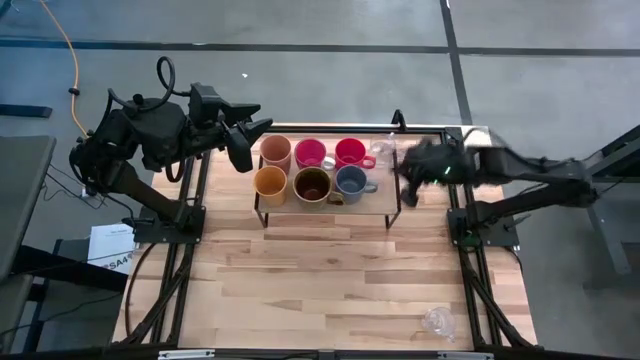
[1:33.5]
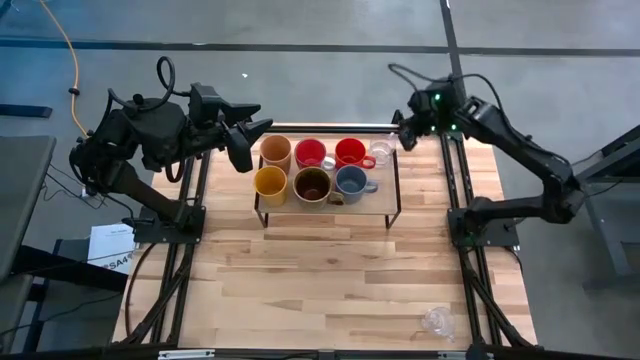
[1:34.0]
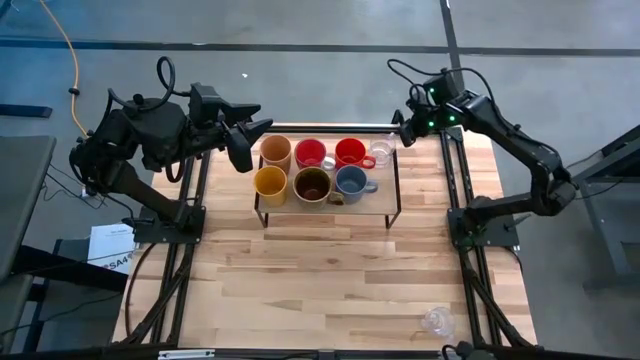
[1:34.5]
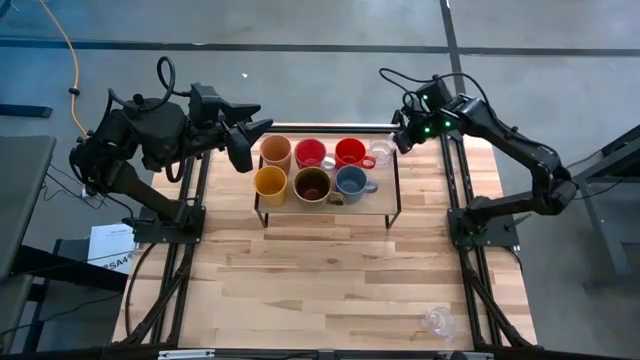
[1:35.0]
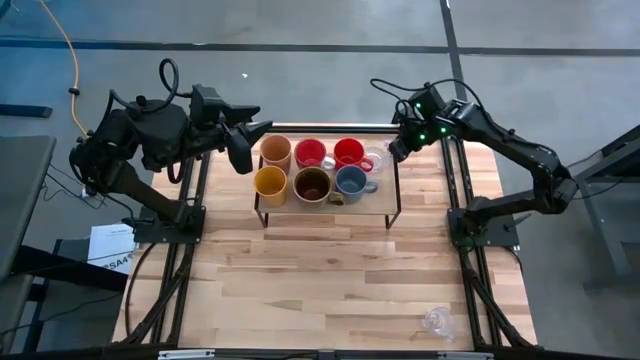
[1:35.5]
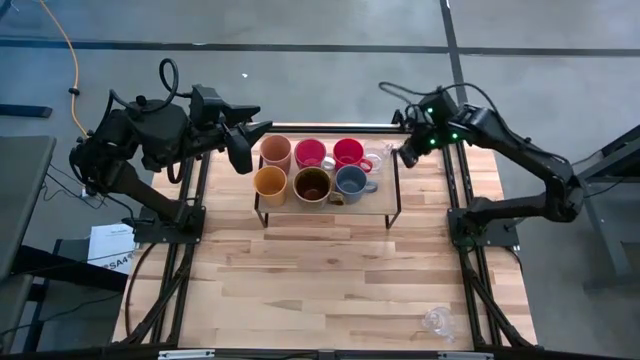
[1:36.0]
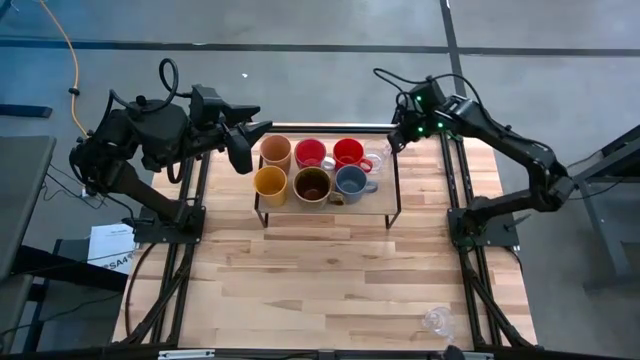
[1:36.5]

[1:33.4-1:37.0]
Task: Stack small to large cups/mugs on shelf
Adjust the transparent mug

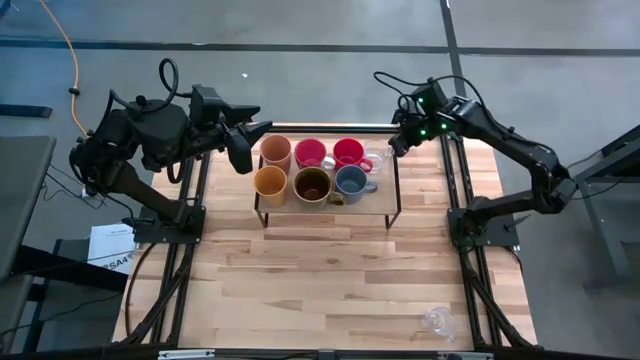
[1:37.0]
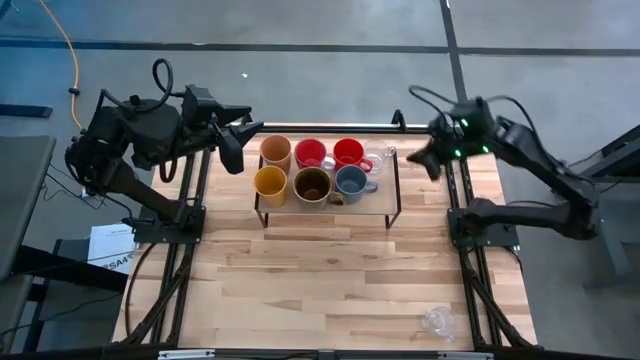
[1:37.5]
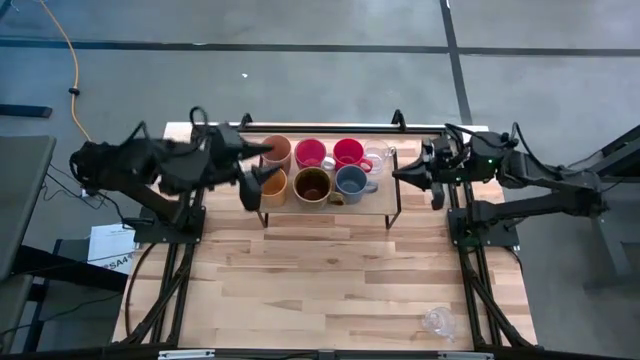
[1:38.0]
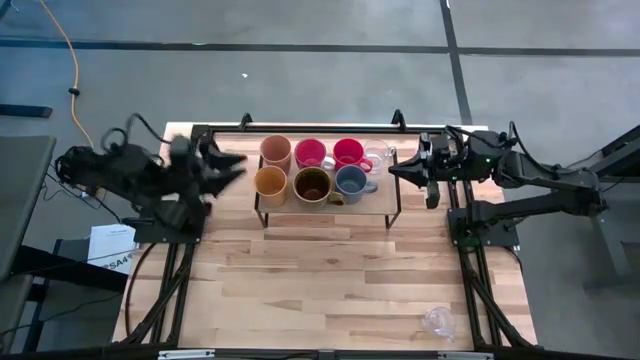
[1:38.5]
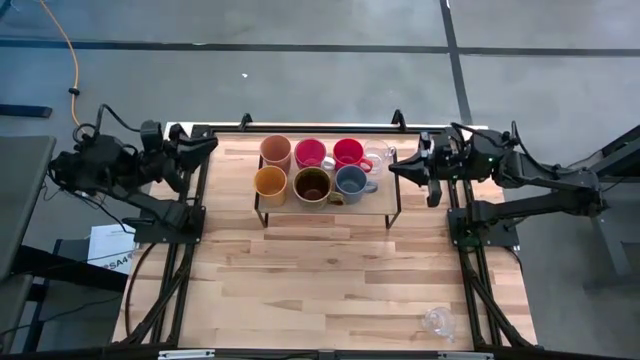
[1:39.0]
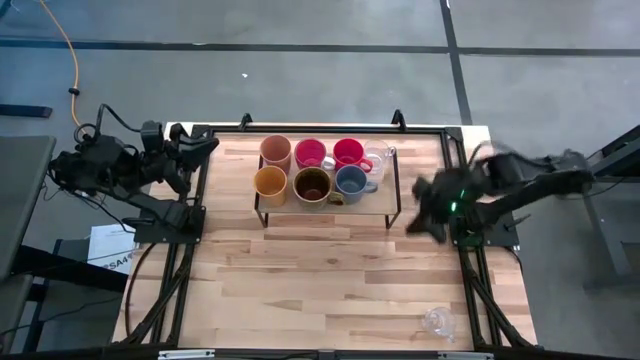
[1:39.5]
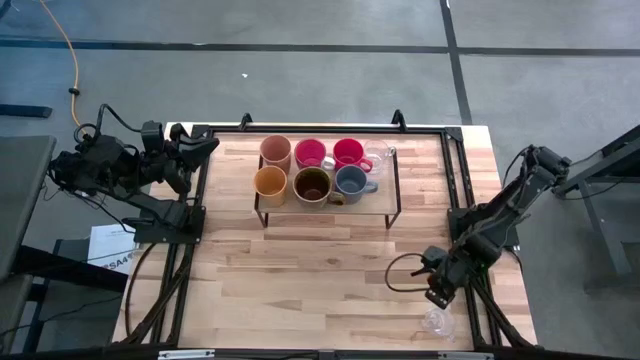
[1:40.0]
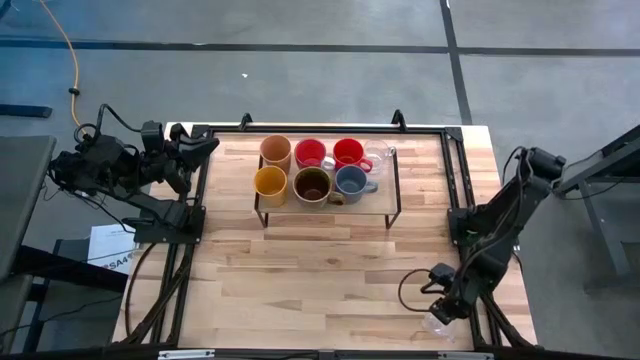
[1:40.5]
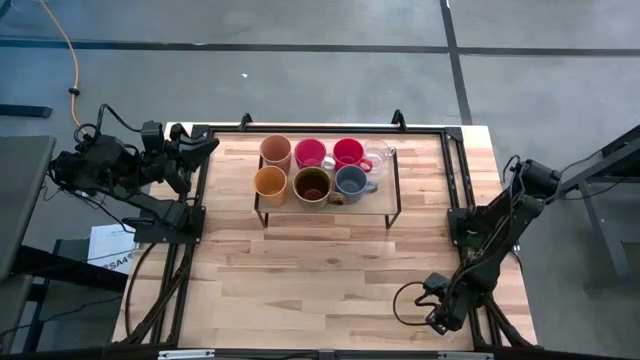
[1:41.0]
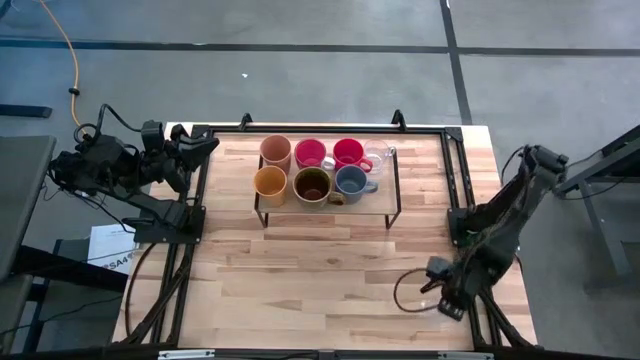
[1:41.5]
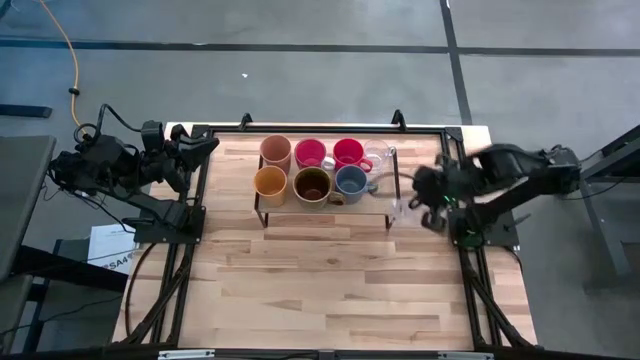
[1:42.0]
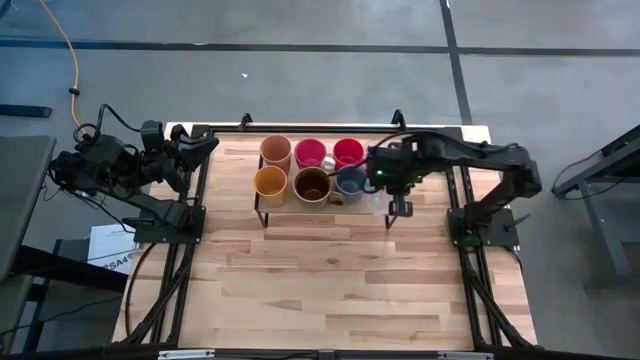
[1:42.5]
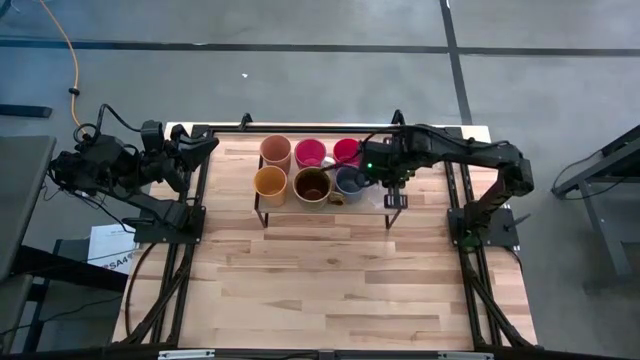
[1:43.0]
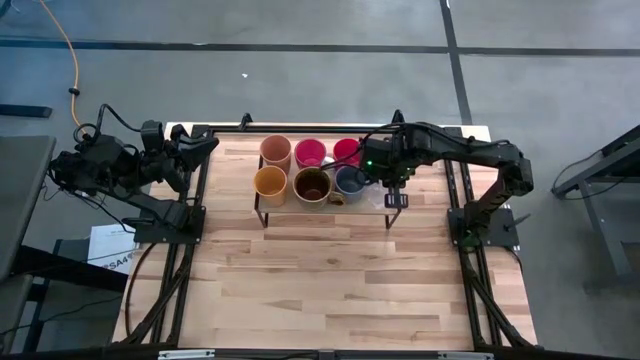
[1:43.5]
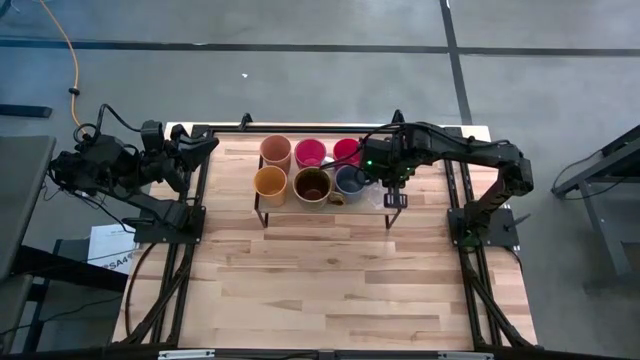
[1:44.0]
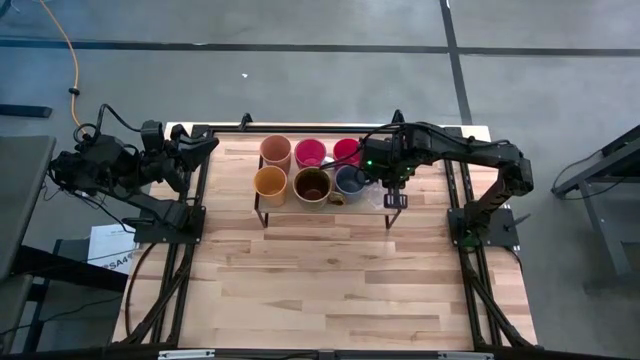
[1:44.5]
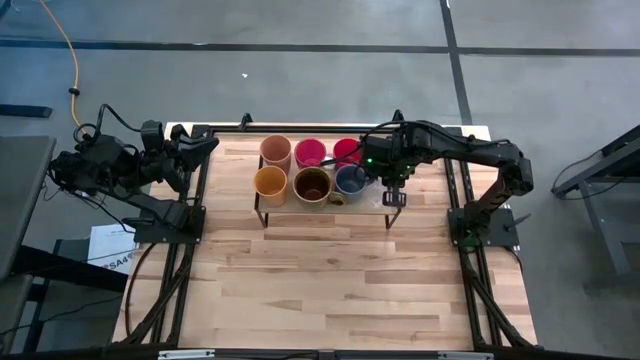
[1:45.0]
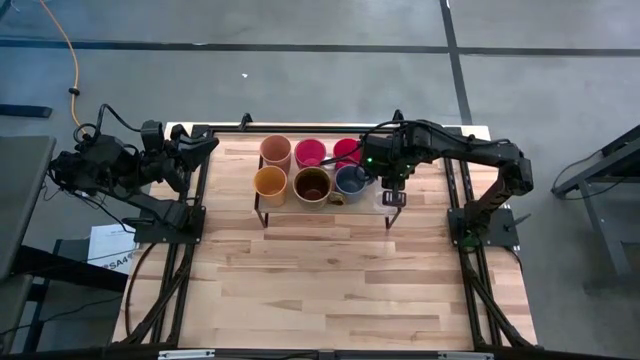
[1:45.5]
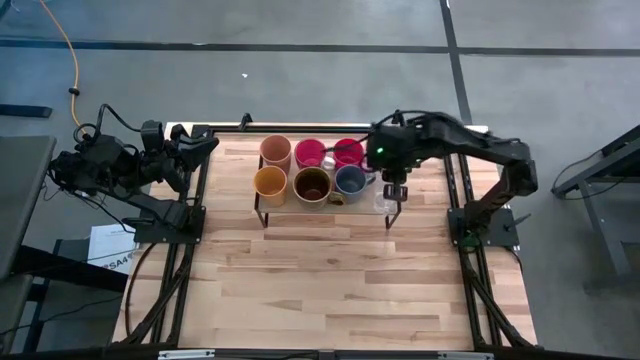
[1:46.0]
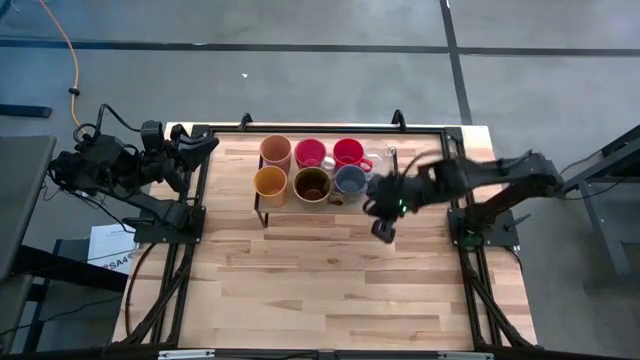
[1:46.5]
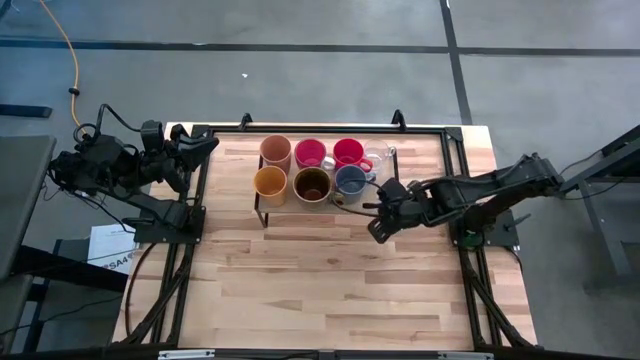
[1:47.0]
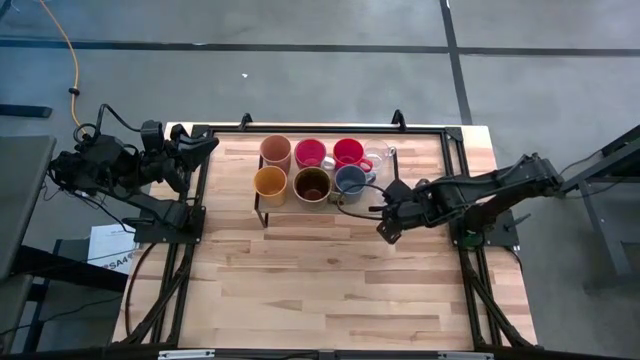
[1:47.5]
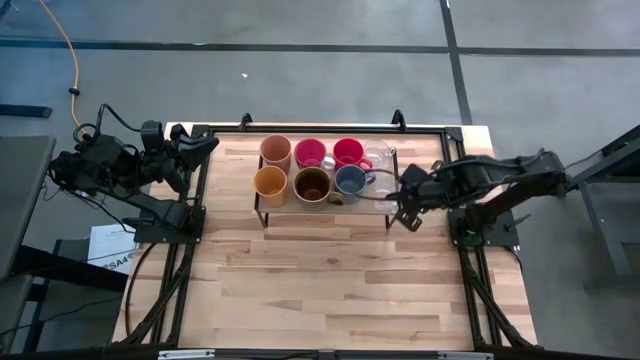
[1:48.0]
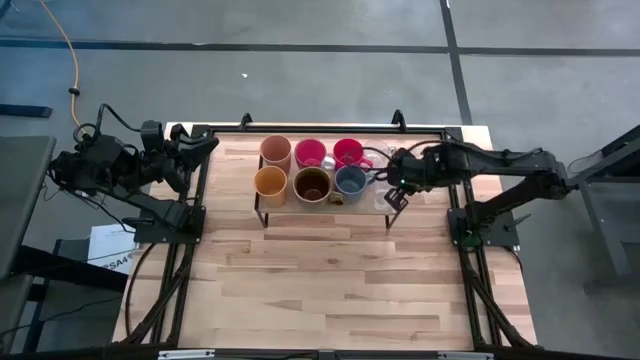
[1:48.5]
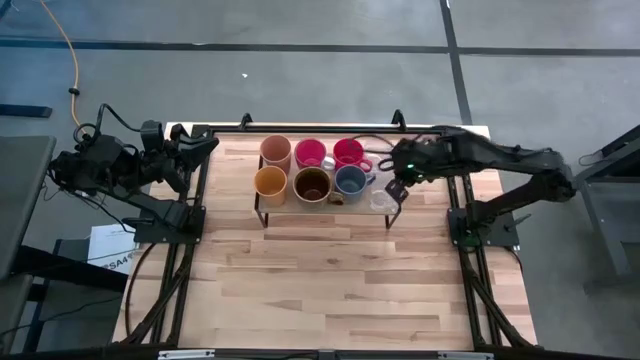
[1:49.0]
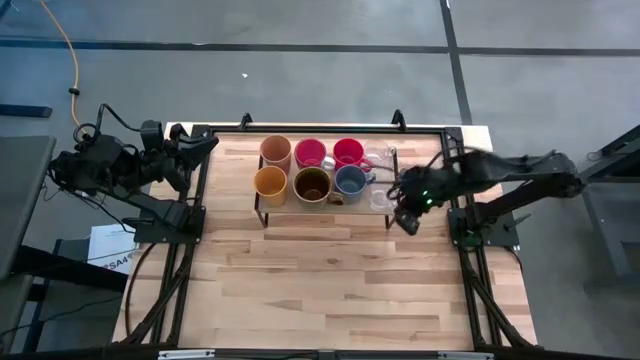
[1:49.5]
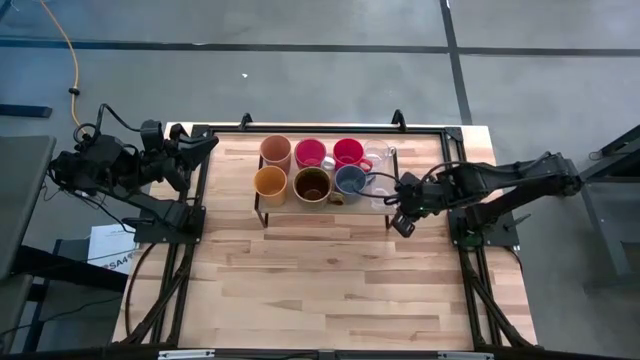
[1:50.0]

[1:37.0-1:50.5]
Put the transparent mug on the shelf

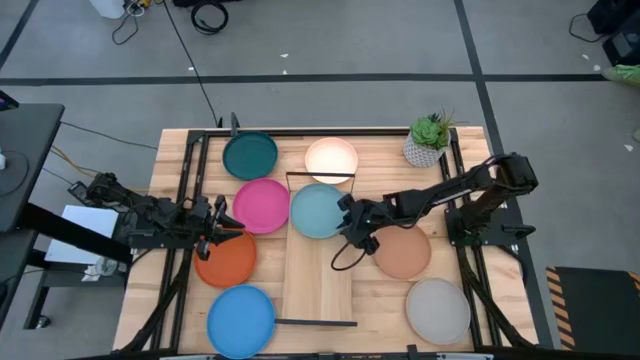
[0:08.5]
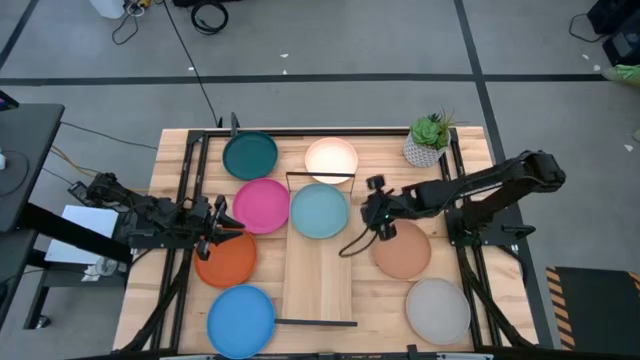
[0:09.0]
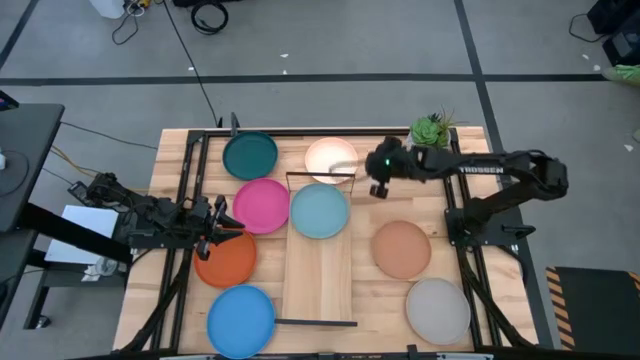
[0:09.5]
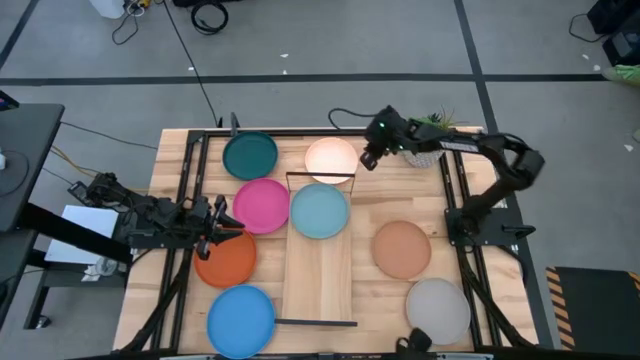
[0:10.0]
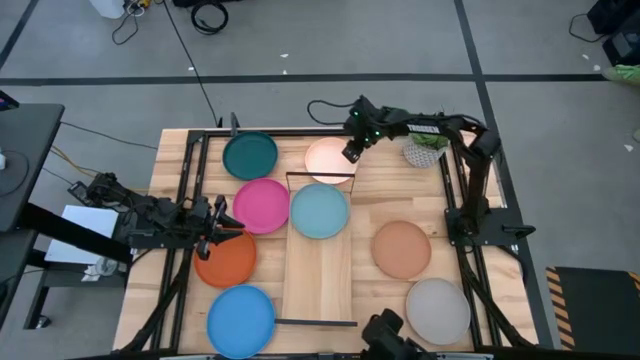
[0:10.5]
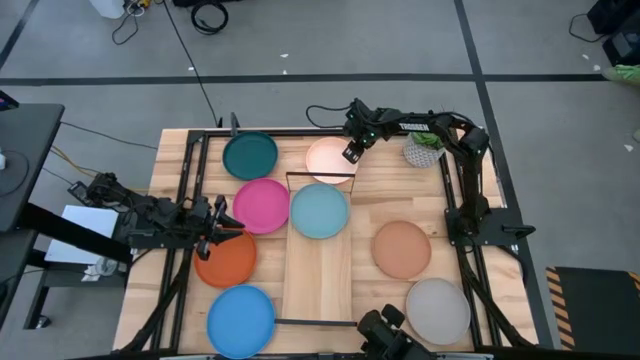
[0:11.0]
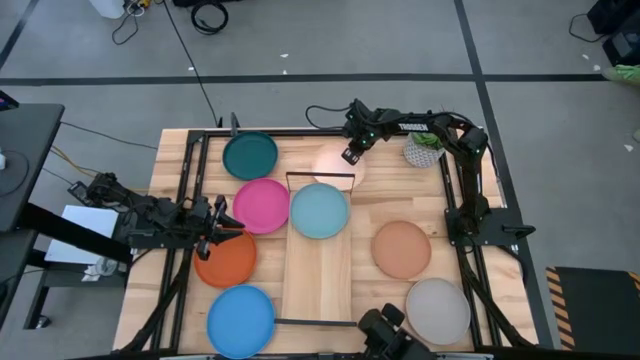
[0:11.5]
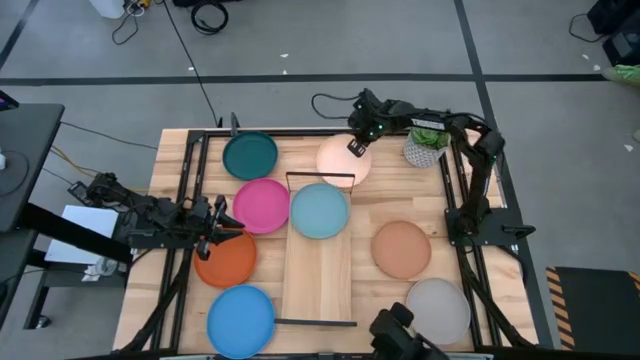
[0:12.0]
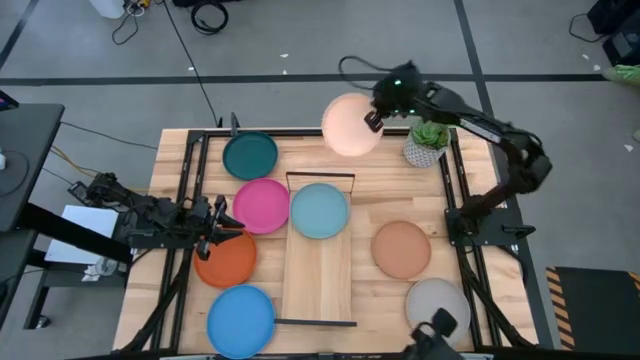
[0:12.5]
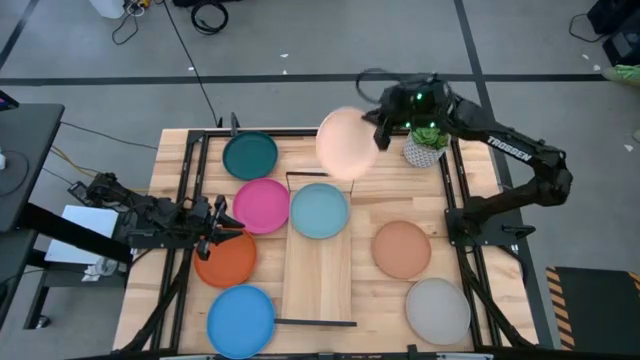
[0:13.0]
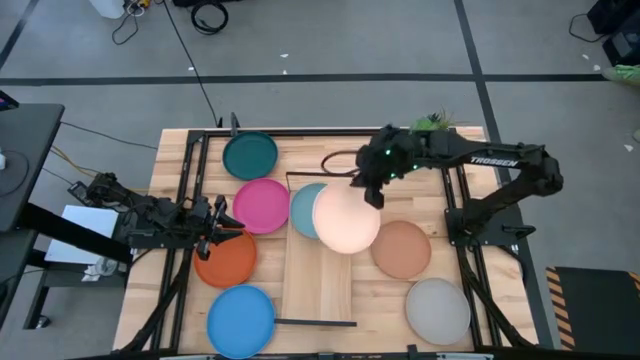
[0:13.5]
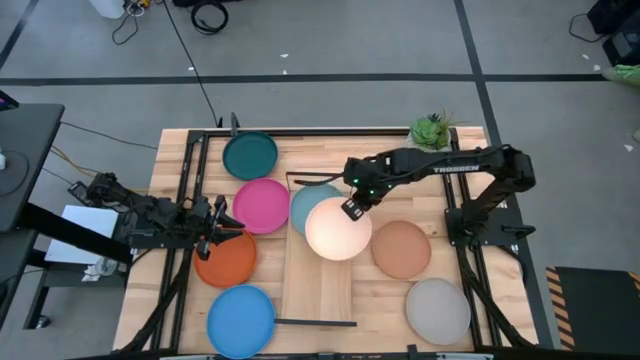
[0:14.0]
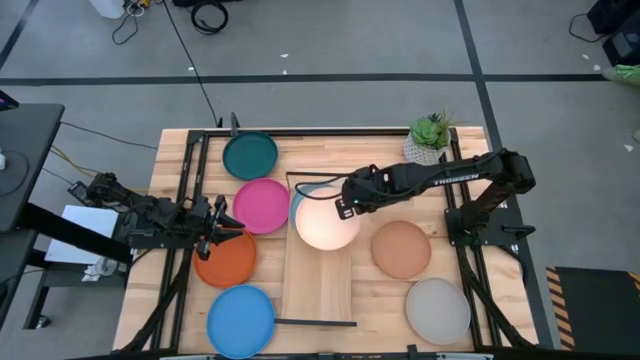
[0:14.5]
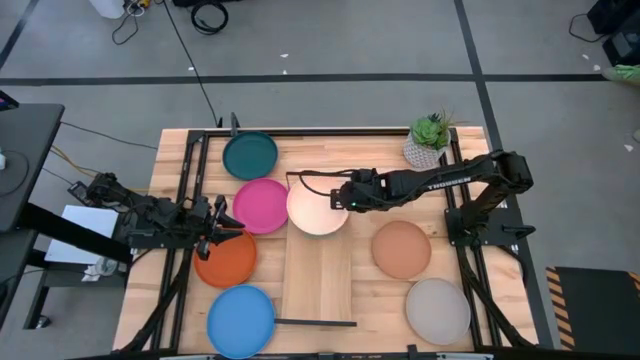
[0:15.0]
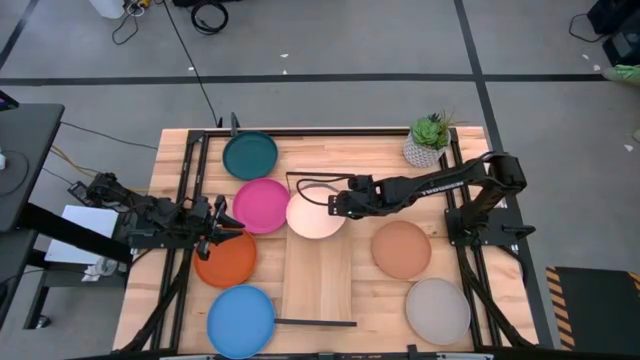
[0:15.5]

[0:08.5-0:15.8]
Task: Place and stack plates onto a shelf
Stack the peach plate on top of the light blue plate on the shelf
